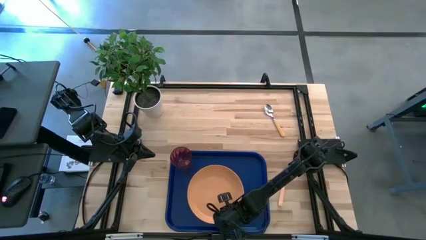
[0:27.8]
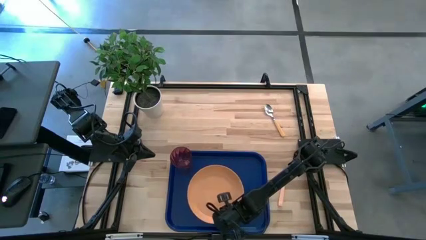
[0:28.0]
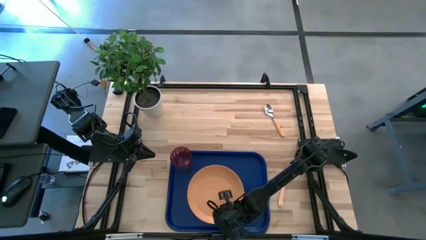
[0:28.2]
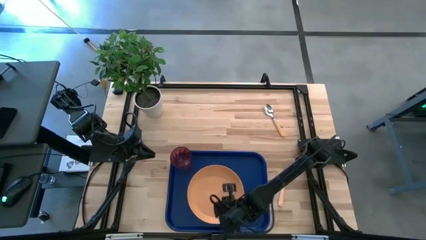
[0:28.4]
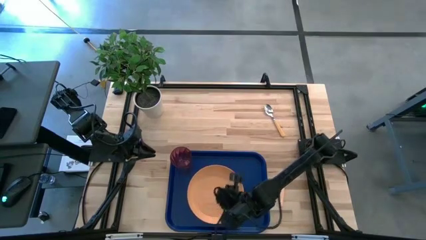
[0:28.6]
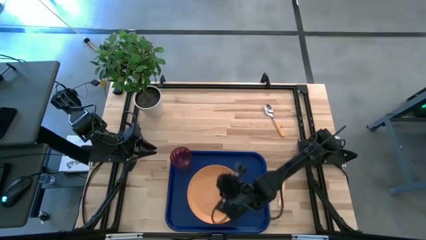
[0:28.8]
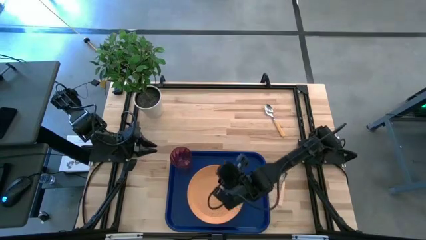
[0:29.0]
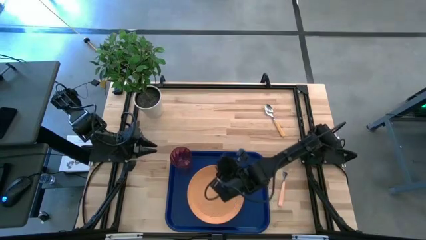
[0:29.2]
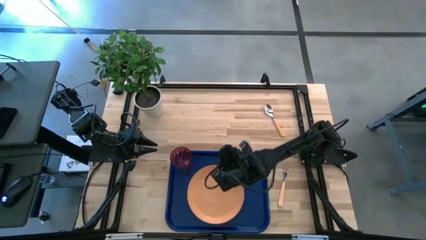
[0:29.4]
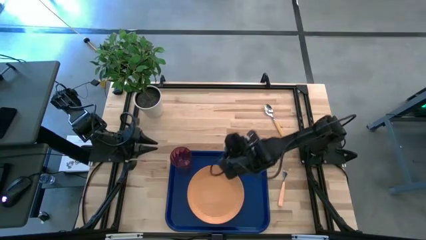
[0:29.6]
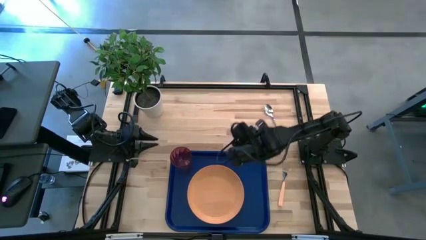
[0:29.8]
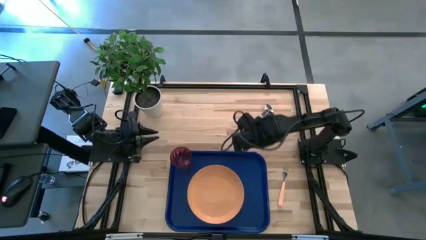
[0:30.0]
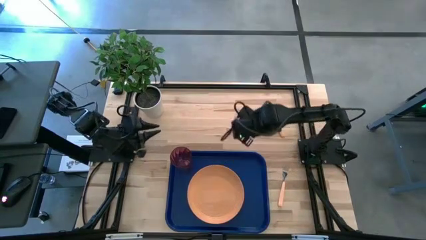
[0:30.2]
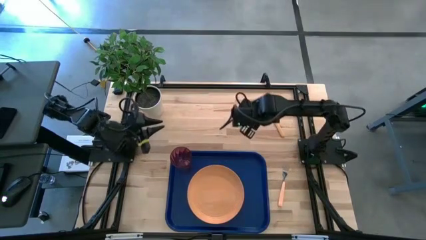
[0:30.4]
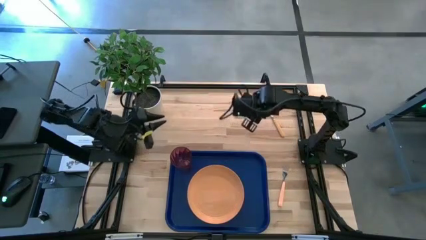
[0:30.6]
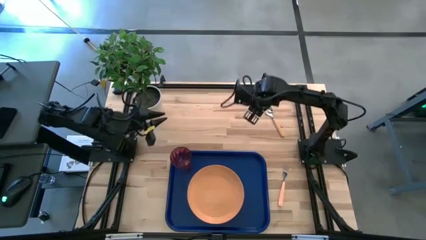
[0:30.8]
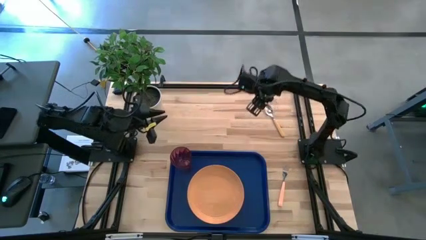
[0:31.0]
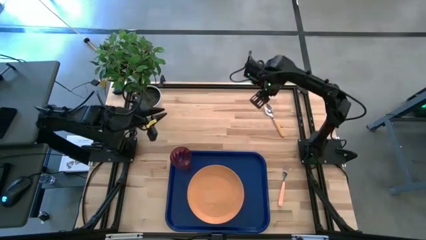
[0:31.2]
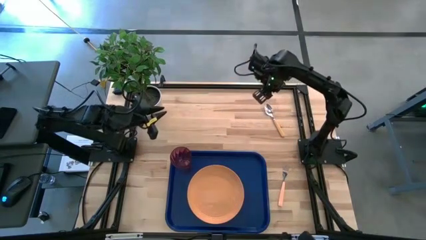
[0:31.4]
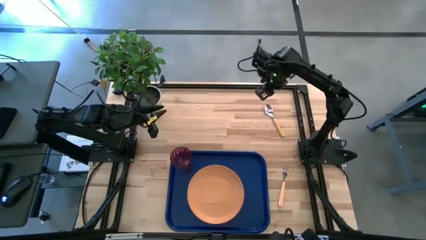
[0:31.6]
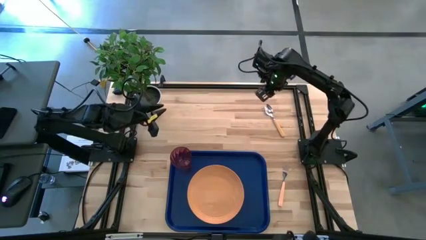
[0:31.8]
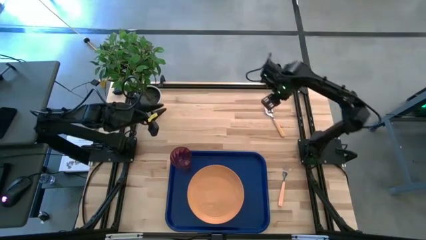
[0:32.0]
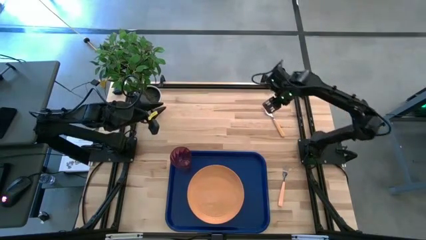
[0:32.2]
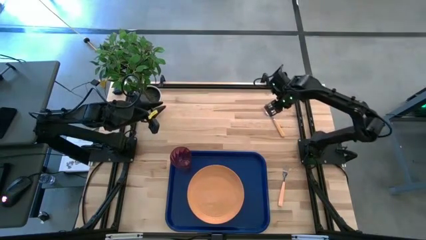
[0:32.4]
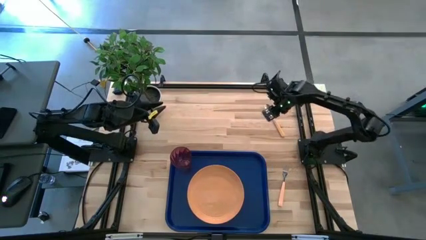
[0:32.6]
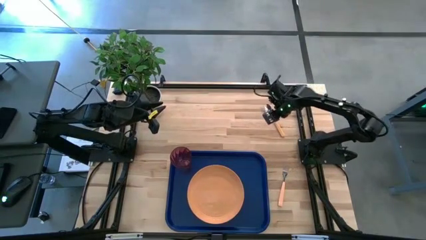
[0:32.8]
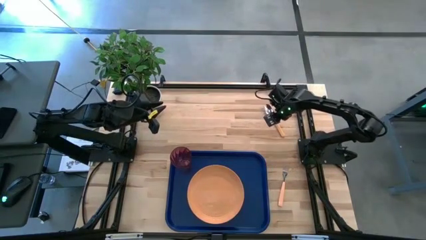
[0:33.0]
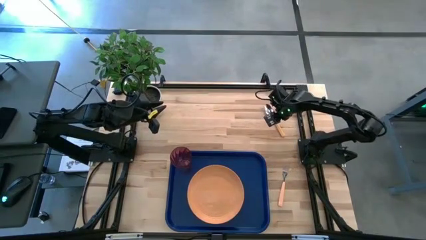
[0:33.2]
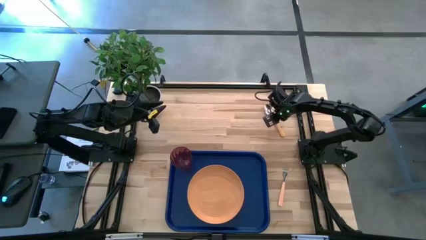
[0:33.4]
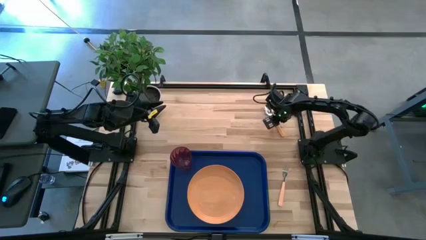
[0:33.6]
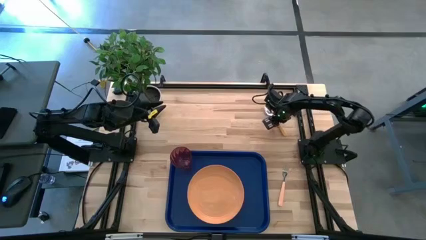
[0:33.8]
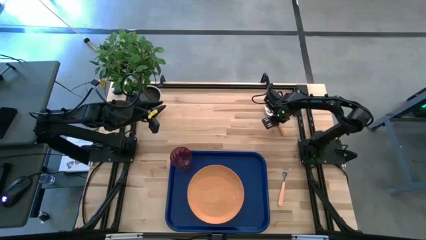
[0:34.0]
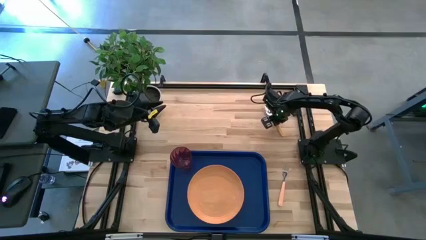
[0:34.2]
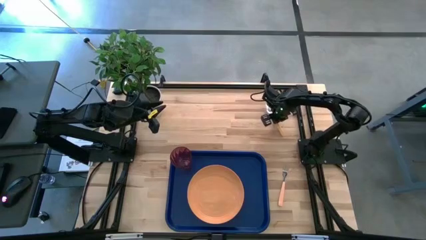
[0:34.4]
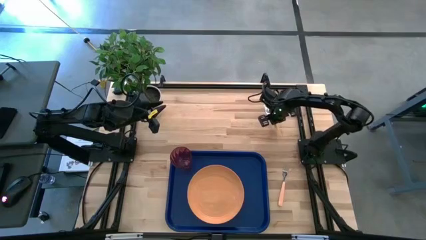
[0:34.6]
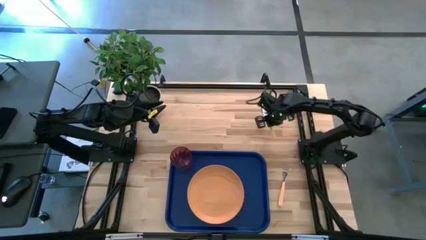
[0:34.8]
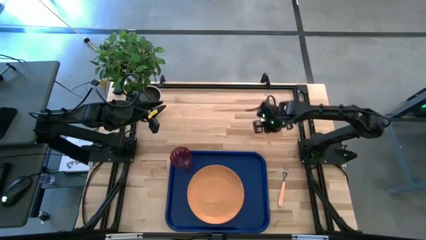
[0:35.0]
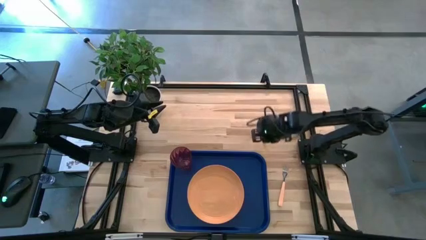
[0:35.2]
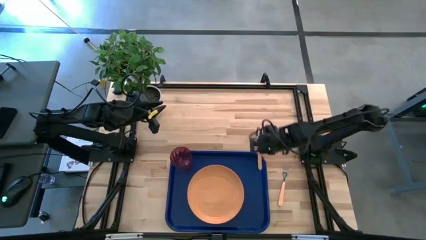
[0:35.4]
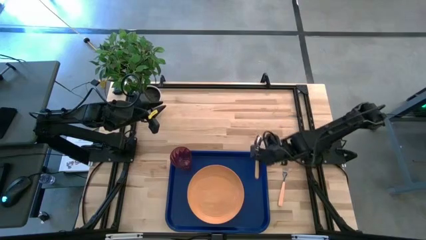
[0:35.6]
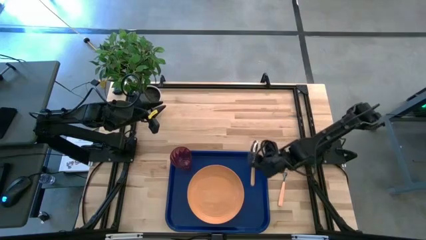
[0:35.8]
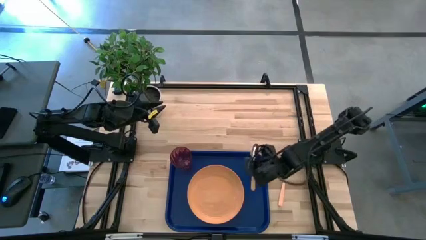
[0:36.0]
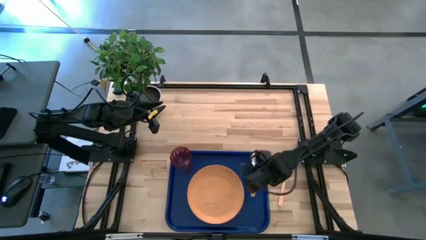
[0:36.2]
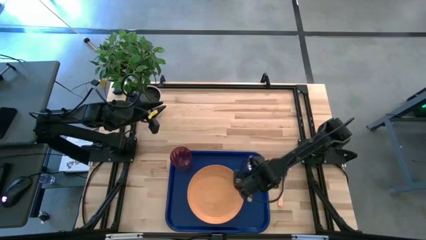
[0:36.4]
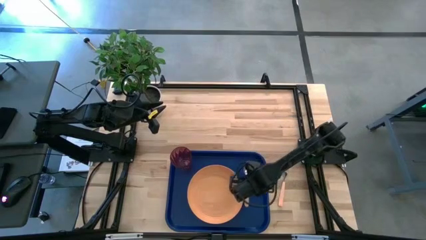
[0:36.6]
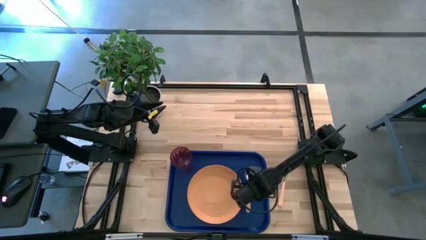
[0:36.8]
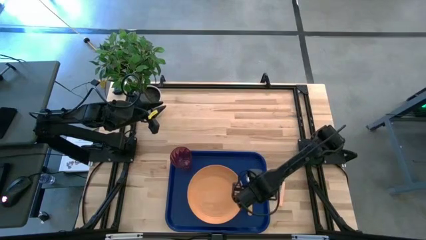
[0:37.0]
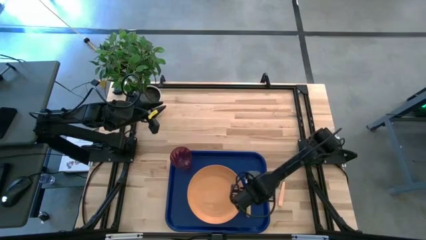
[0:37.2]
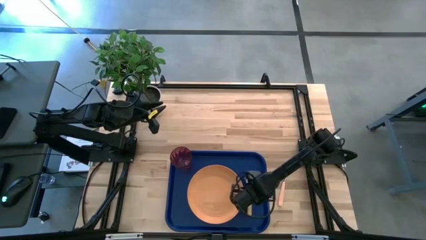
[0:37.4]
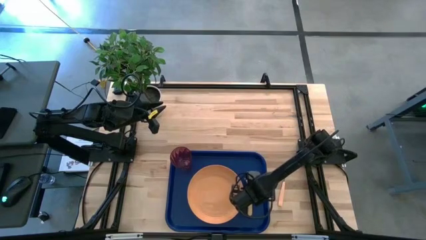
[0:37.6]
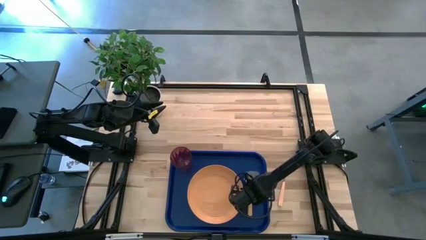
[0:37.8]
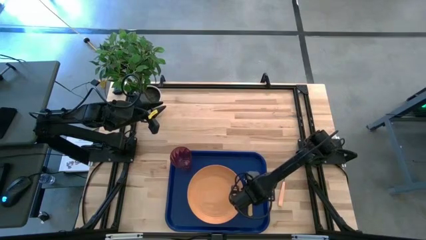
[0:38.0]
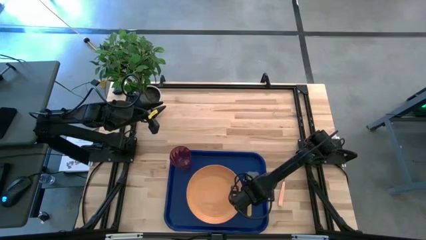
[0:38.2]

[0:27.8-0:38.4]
Task: Pick and place plate/cup/fork/spoon on tray
Put the yellow spoon on the blue serving tray to the right of the orange plate

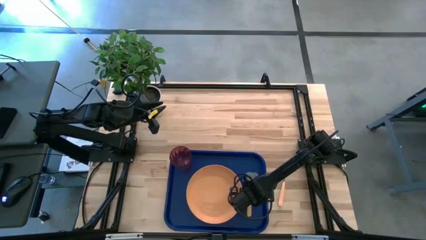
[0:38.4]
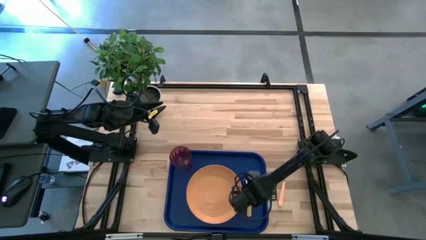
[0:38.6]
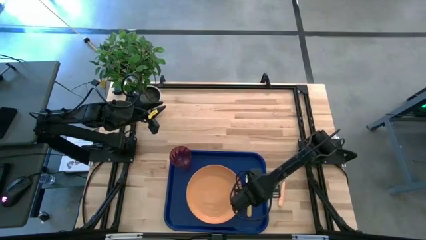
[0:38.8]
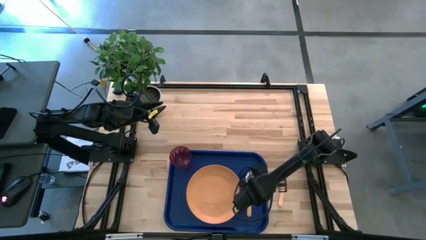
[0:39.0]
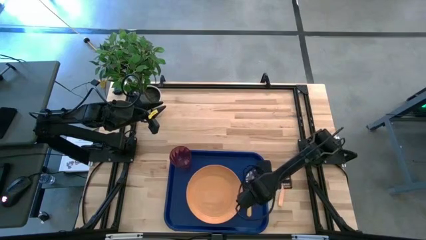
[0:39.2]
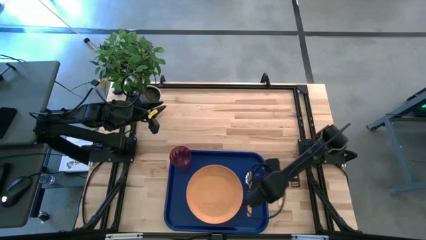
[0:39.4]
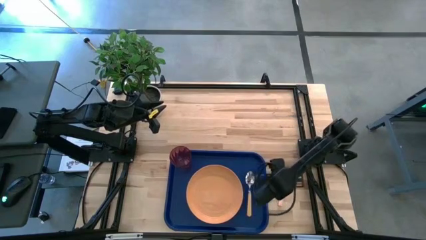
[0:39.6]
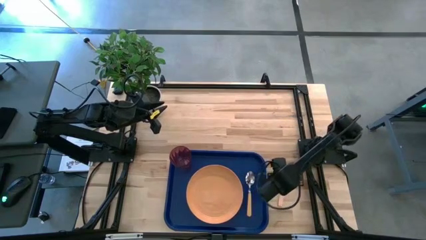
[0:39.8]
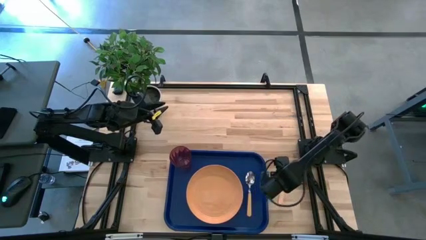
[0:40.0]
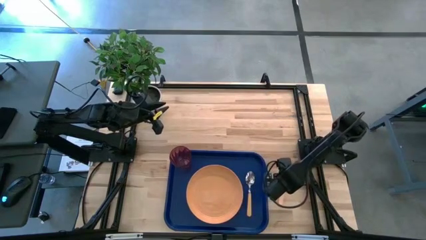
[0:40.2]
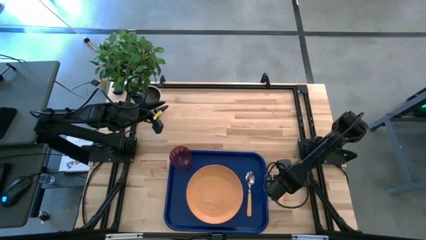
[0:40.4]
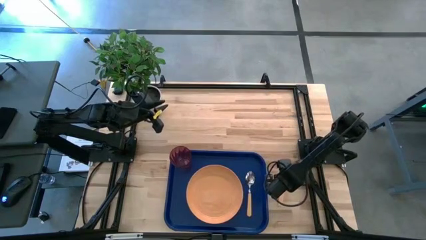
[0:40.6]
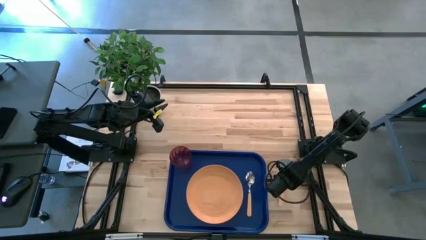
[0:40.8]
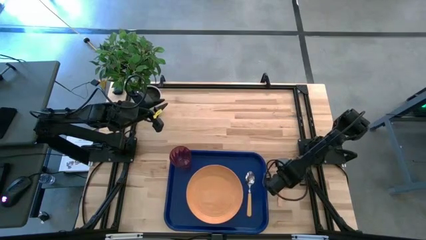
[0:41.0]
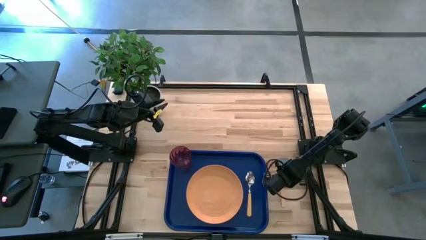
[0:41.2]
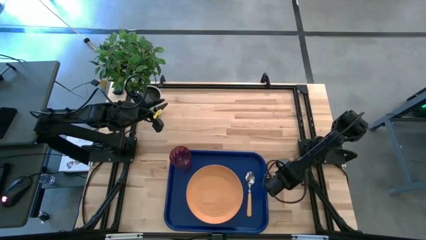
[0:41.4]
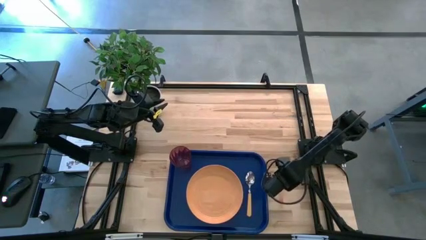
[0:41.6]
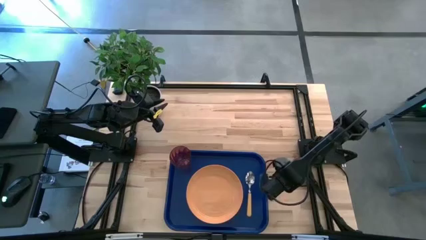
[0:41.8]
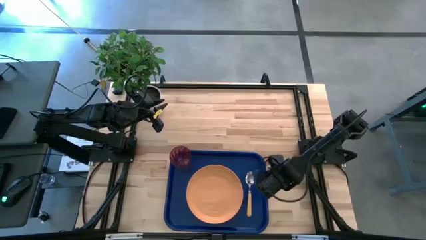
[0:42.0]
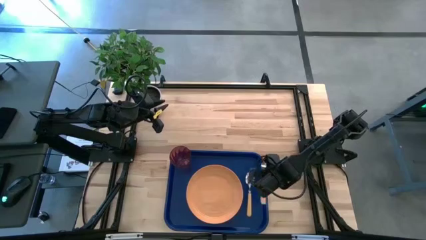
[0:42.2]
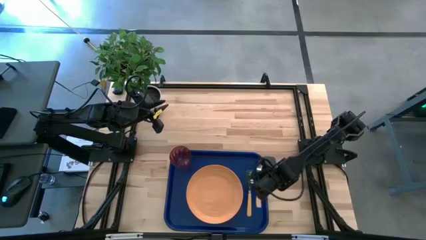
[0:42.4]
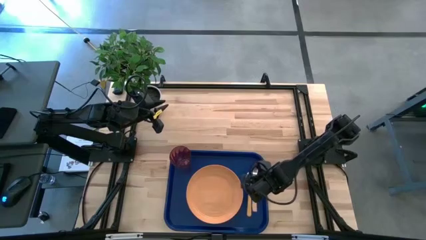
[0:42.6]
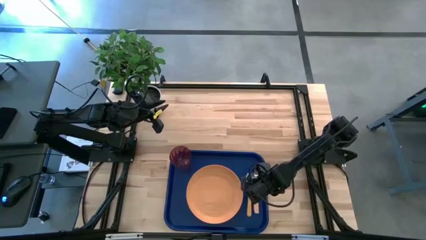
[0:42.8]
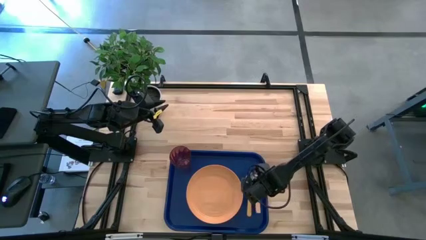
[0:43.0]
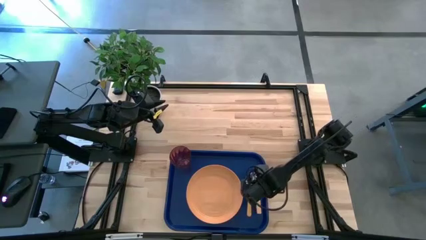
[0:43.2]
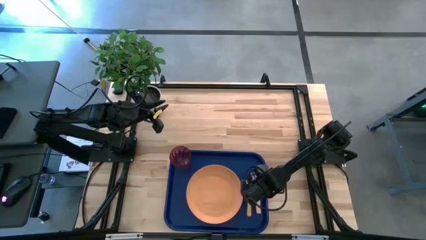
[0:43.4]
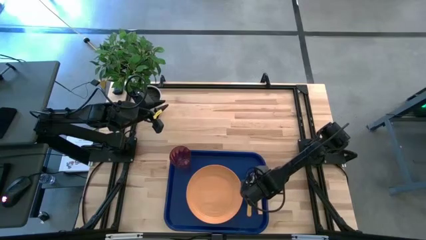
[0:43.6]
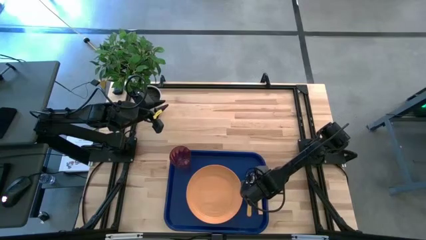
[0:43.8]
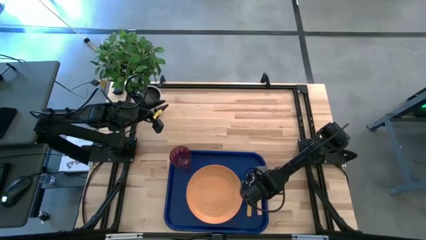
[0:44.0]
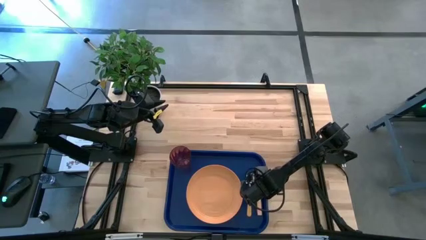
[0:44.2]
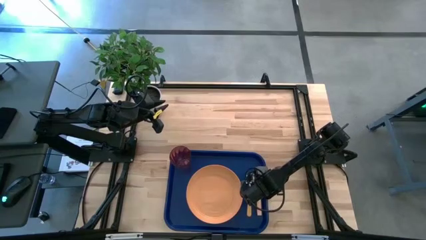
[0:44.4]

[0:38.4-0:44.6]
Put the orange fork on the blue serving tray to the right of the yellow spoon
